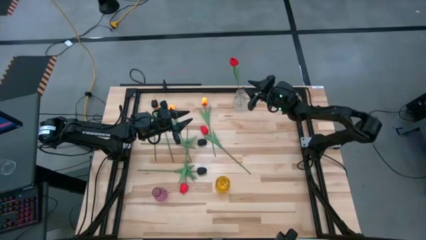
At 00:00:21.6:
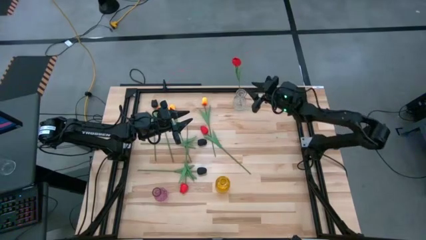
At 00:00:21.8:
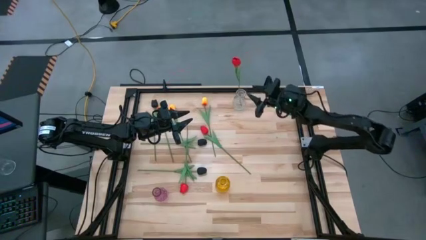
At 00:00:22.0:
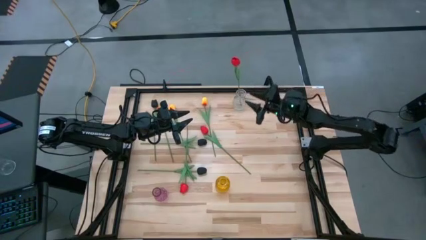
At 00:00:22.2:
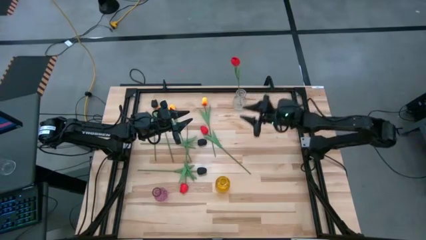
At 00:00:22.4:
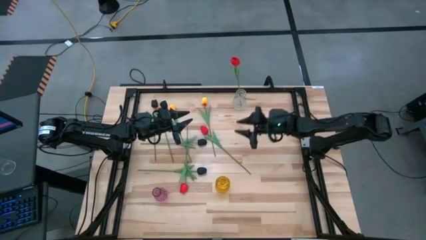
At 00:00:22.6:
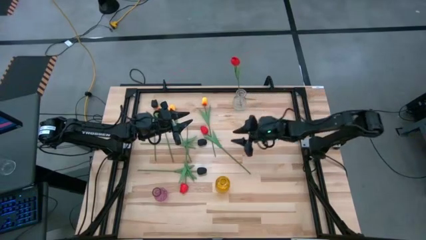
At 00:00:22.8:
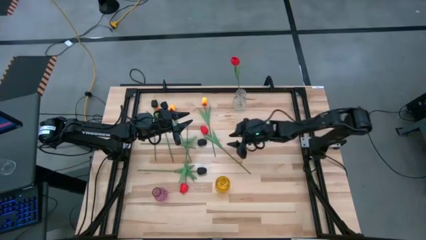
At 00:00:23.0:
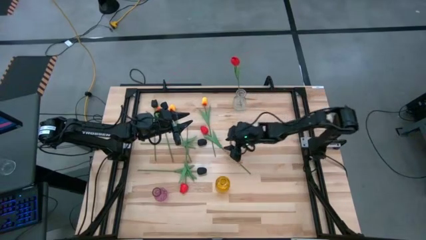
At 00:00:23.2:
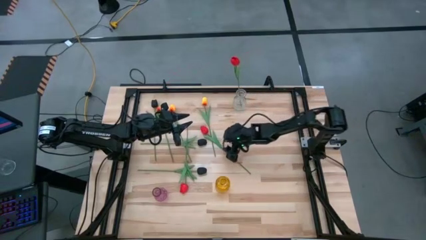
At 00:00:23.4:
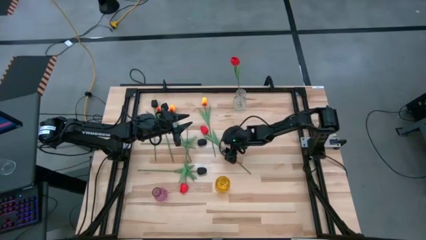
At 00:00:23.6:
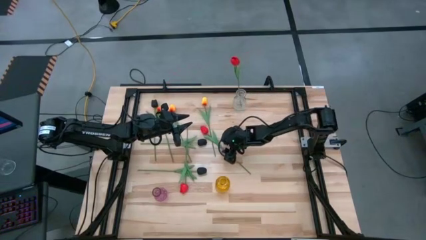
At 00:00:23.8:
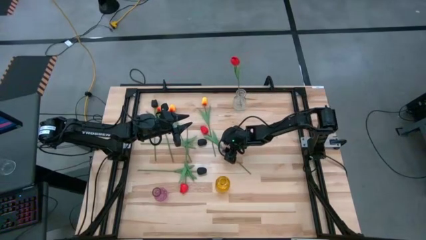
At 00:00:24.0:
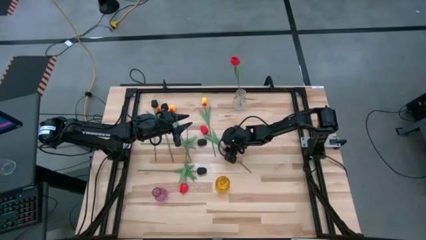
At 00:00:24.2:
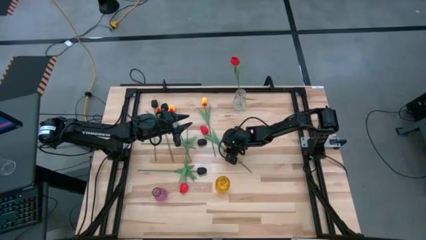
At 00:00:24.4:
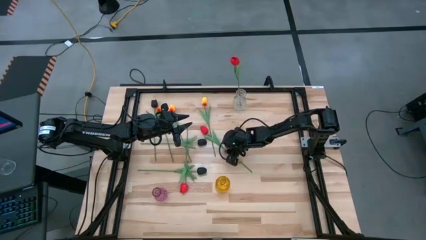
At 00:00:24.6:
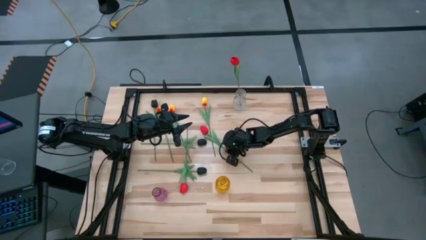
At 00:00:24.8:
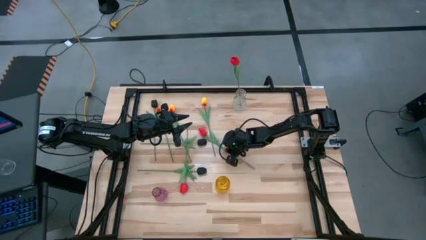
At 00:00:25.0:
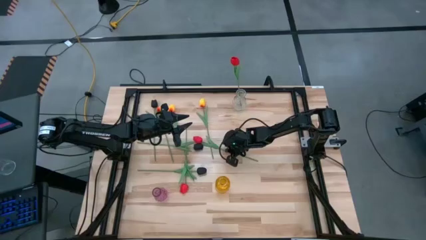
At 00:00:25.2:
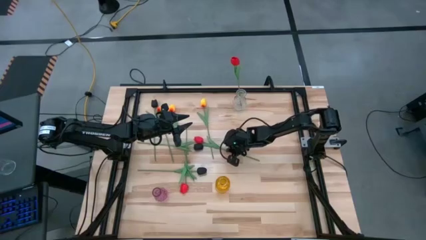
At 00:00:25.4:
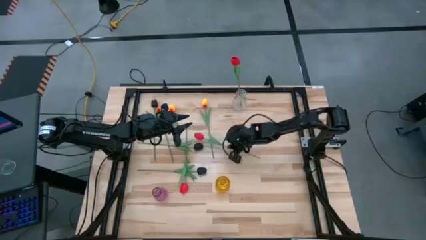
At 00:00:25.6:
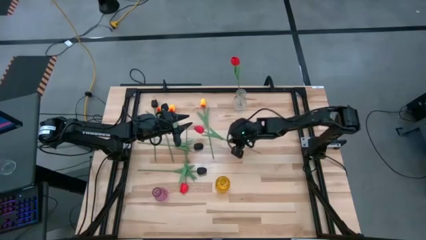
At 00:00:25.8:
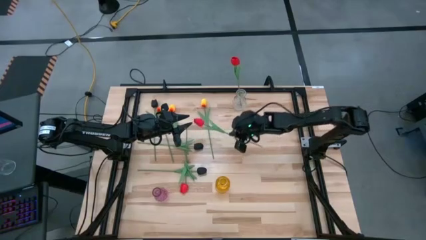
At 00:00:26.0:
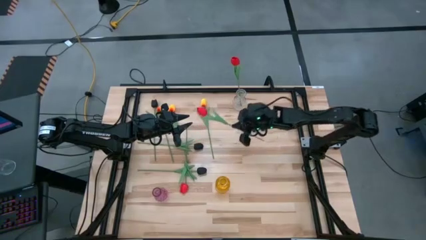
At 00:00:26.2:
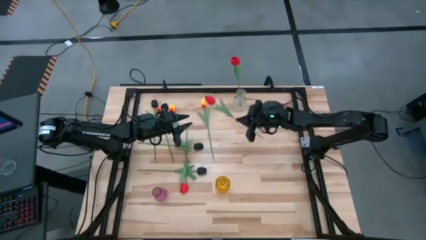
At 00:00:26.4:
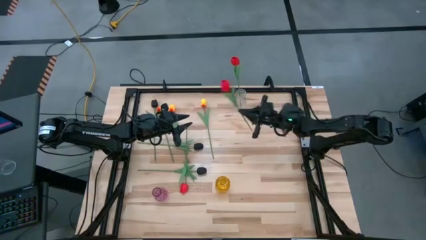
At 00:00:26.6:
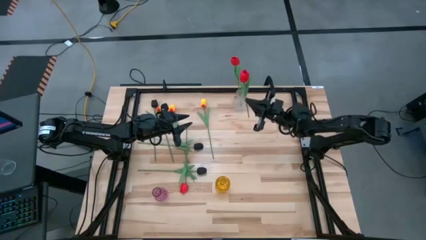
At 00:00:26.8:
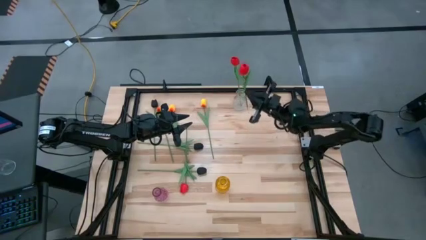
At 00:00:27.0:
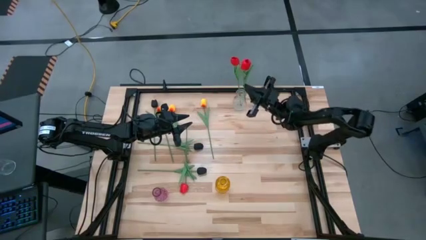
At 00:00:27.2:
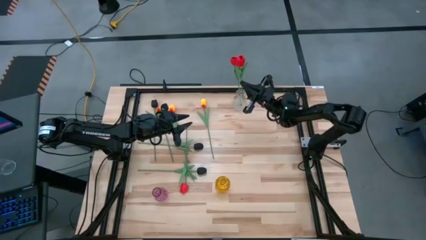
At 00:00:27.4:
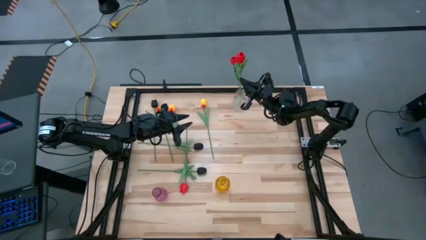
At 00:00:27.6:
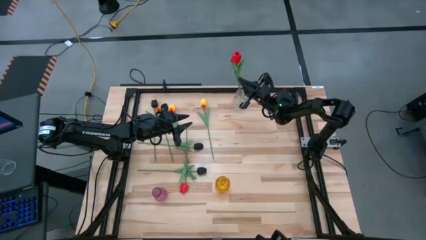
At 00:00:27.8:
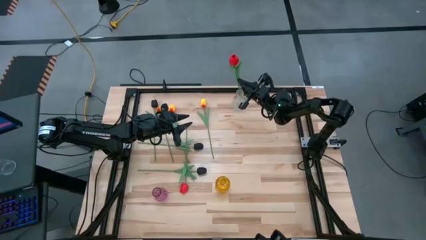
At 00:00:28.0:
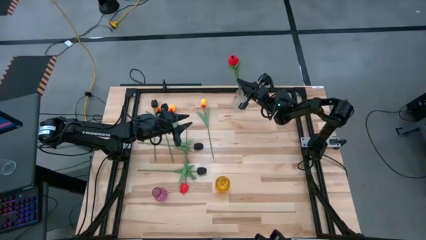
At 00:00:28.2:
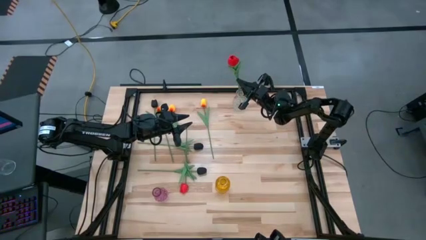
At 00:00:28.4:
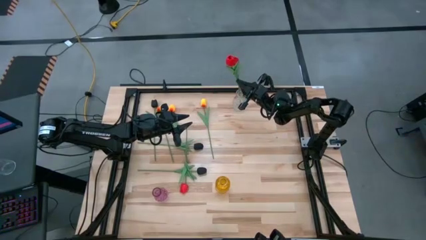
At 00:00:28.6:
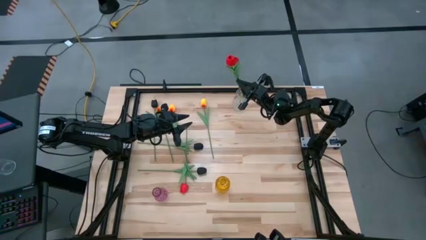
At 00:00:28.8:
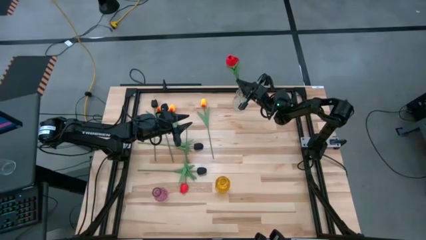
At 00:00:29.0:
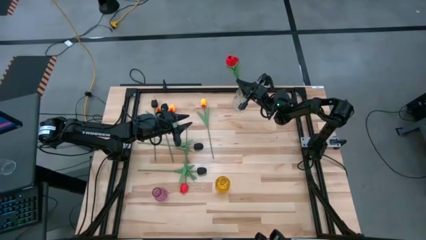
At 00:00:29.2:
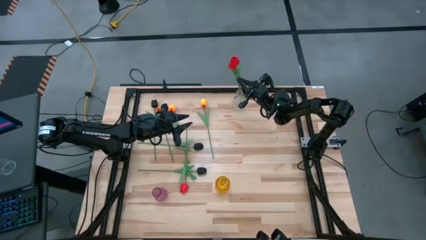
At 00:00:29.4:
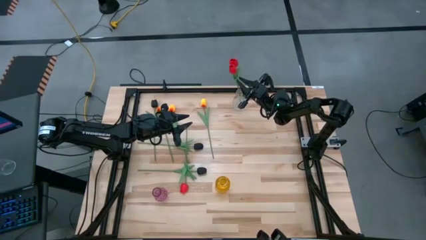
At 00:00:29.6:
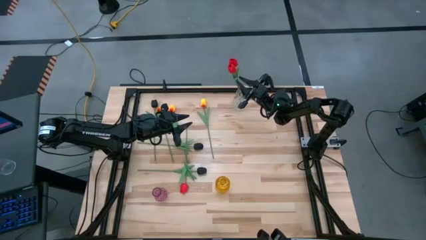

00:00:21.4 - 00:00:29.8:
Task: Sort flowers into vase by color
Put the right red flower into the transparent vase

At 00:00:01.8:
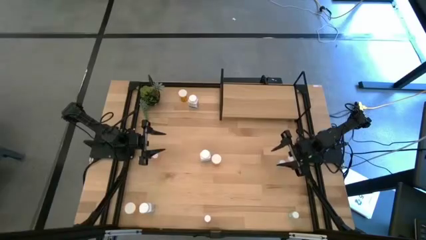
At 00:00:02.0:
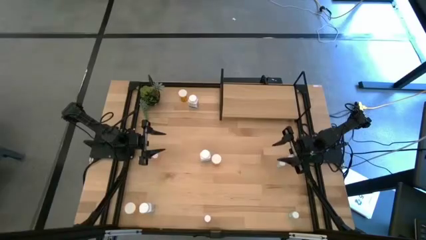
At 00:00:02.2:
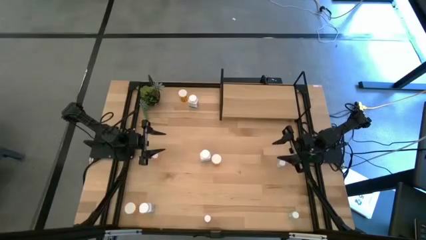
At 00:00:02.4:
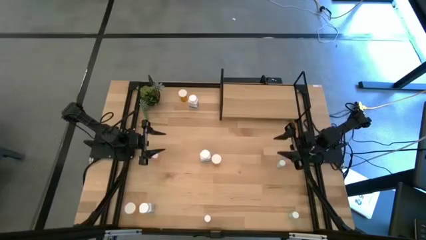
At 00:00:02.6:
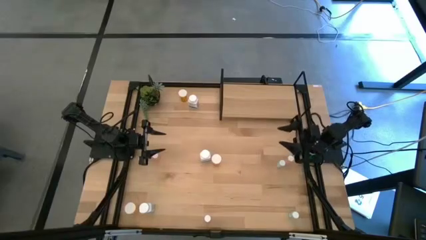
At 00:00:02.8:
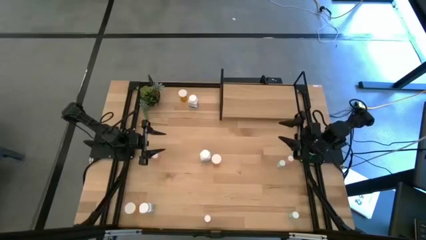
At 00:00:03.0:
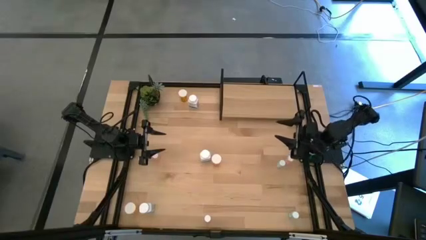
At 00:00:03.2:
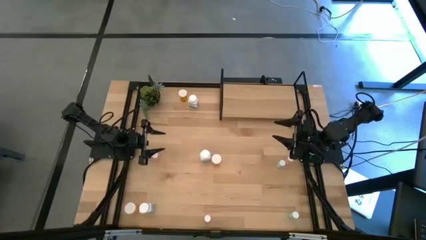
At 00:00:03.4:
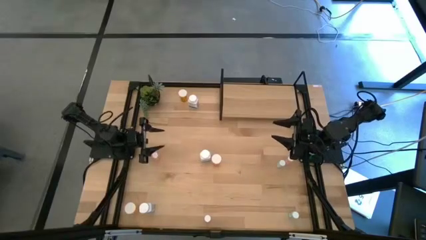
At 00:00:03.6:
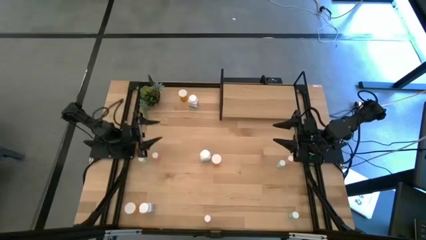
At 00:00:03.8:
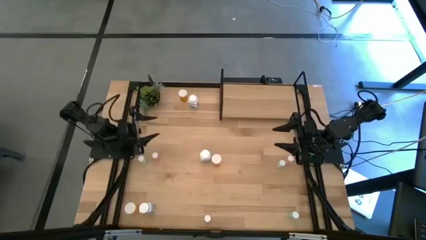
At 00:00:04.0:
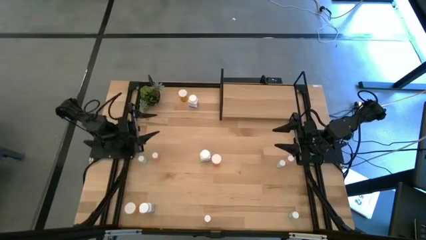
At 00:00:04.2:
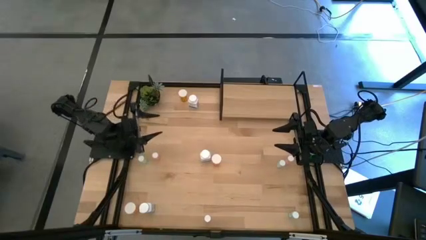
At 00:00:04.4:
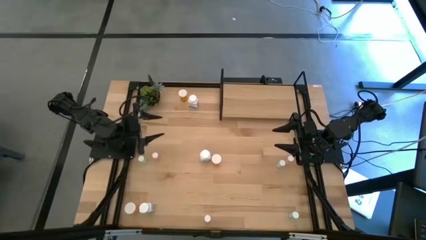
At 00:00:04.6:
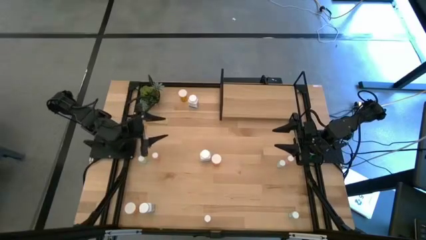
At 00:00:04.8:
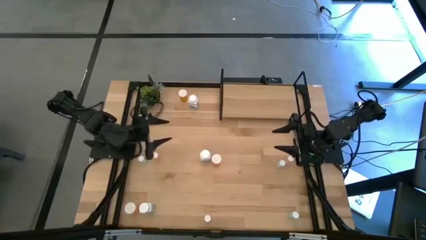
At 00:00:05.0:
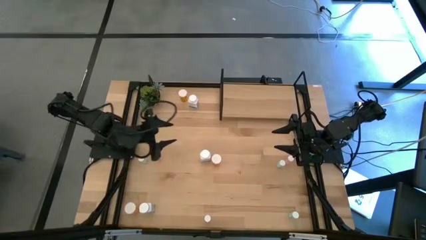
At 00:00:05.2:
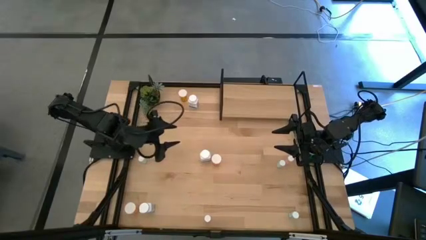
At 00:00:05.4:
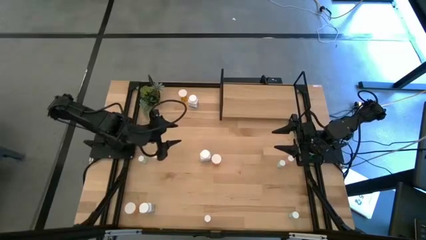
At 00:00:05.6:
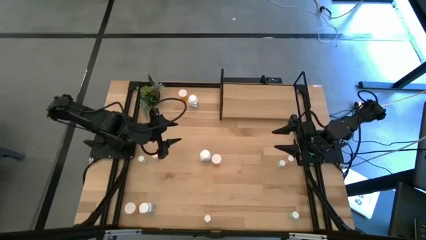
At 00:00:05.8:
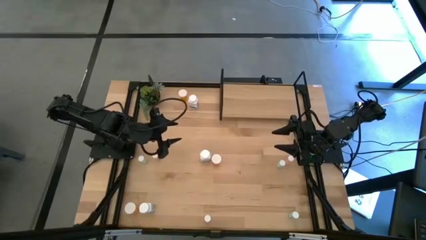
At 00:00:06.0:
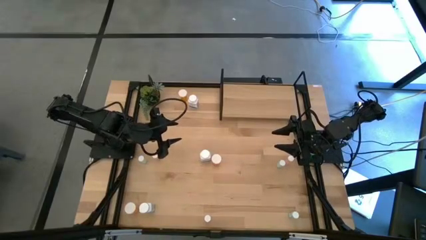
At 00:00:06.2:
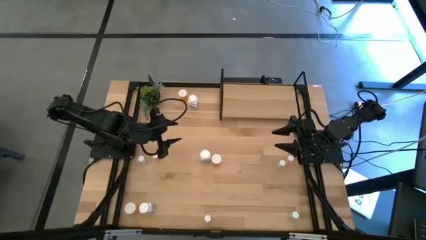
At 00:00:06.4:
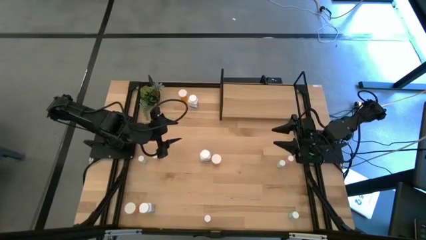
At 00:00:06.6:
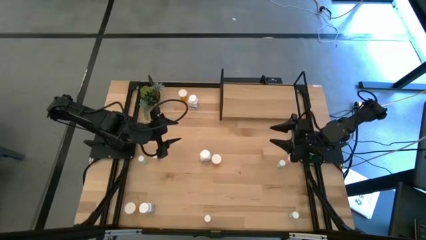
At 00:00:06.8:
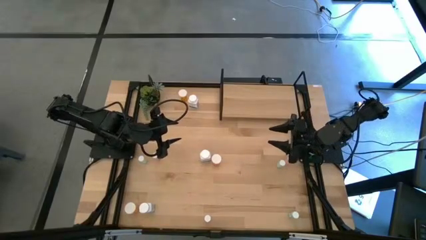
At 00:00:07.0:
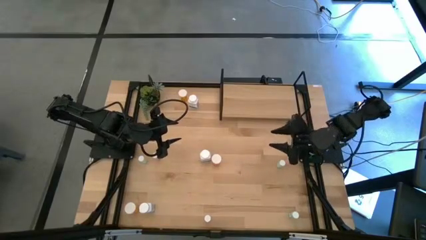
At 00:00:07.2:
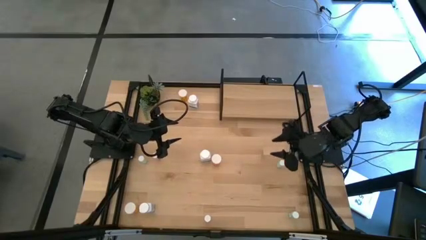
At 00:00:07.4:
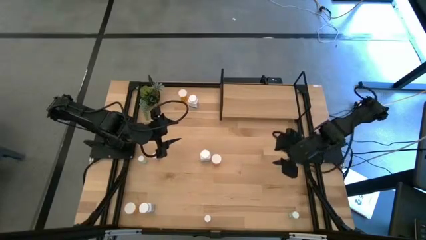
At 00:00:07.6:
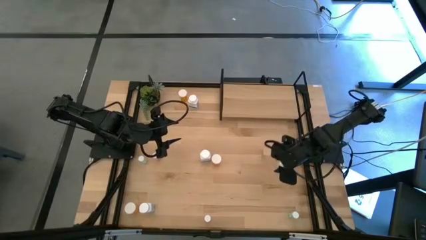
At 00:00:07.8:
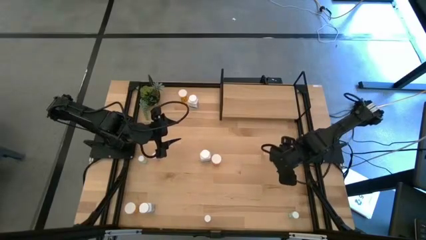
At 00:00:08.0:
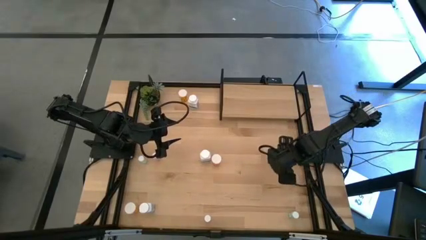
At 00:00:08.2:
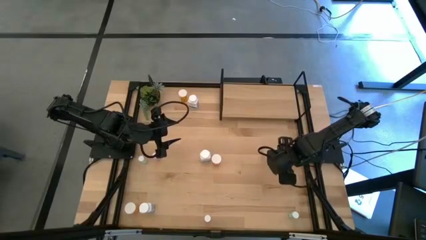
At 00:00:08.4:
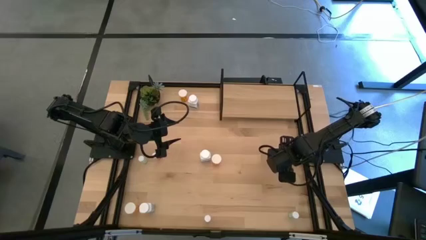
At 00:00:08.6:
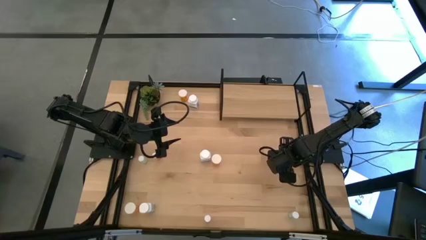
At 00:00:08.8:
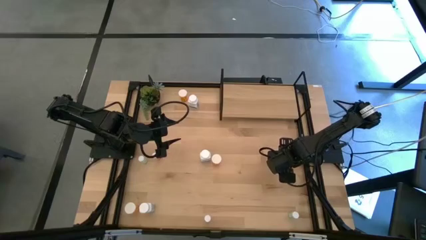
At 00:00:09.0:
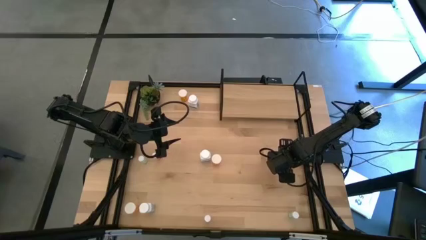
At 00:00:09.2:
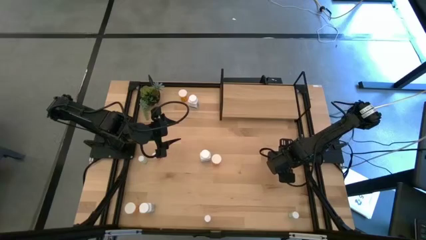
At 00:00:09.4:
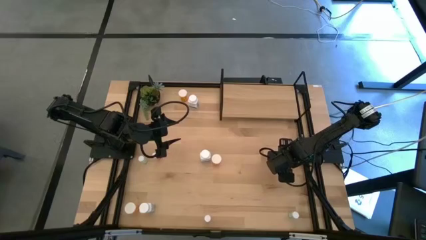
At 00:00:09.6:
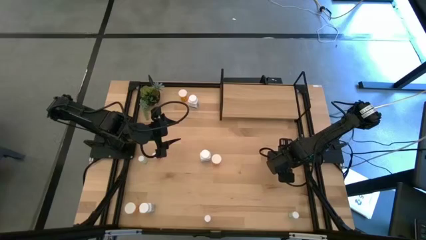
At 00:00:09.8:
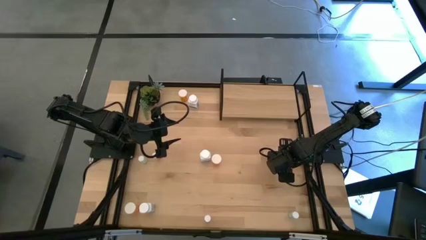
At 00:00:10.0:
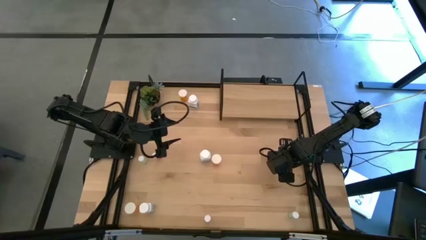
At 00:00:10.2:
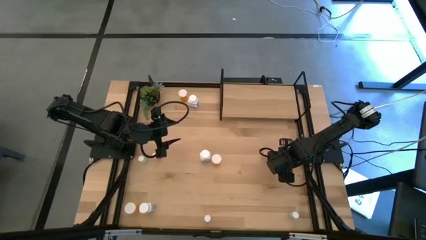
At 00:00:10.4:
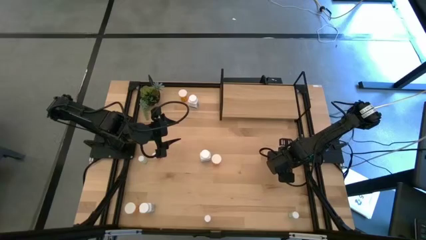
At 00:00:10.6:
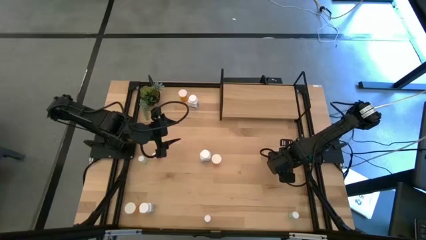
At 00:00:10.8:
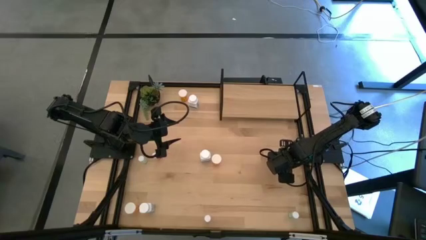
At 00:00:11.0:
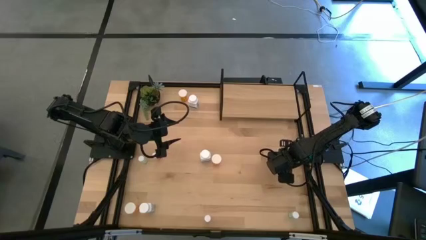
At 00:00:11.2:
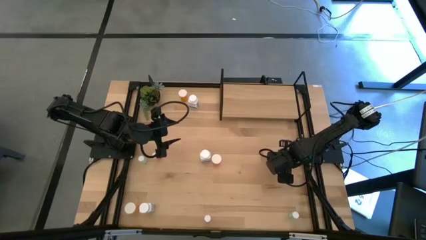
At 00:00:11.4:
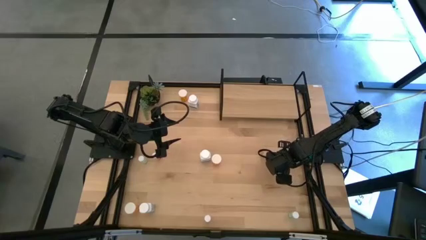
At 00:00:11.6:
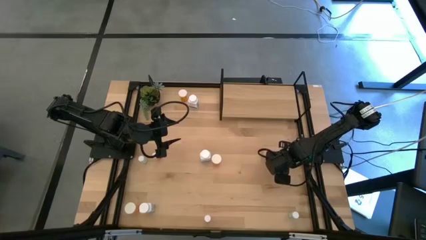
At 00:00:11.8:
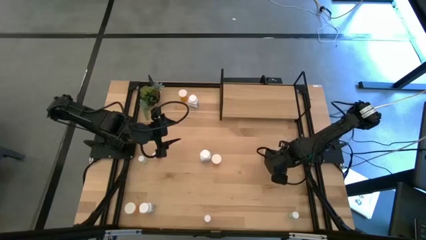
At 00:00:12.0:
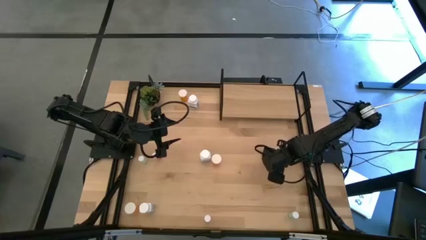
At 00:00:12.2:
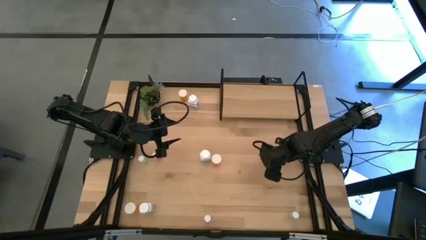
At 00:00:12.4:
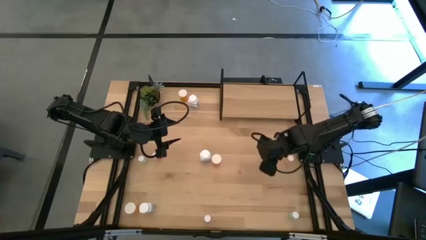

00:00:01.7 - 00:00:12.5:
Task: Pick and place medicine bottles onto shelf by color
Put the top right blue pill bottle on the shelf
